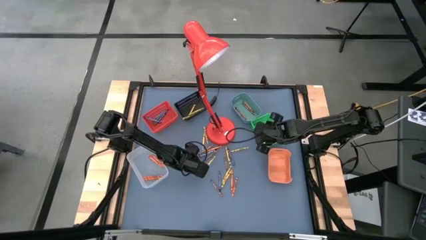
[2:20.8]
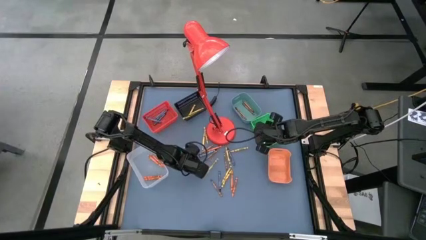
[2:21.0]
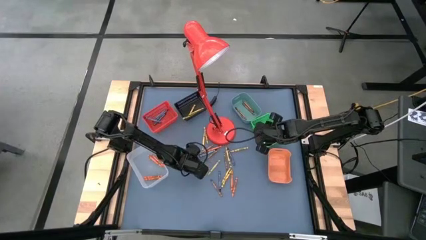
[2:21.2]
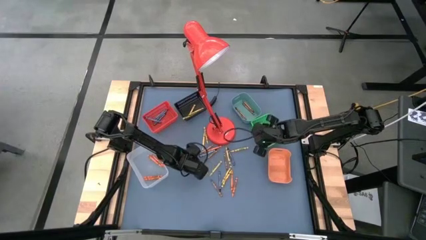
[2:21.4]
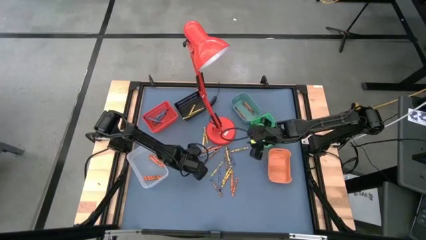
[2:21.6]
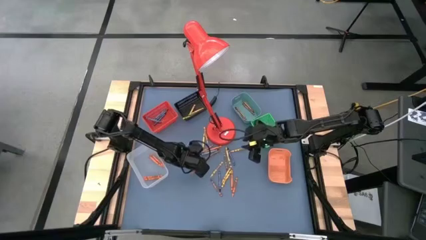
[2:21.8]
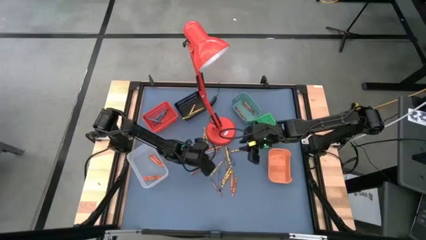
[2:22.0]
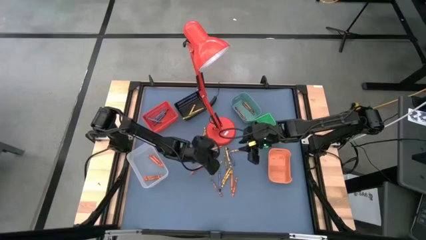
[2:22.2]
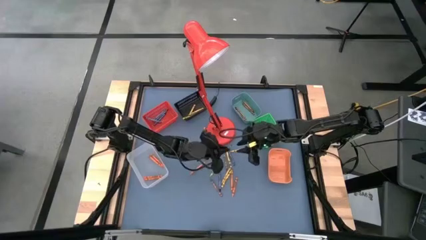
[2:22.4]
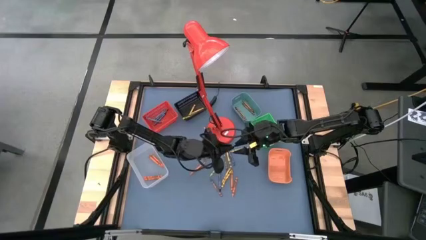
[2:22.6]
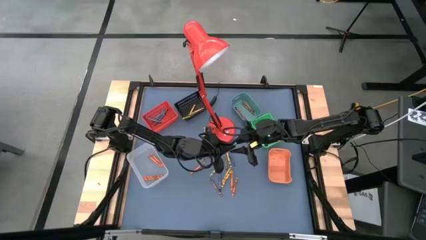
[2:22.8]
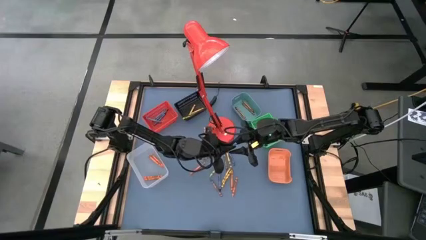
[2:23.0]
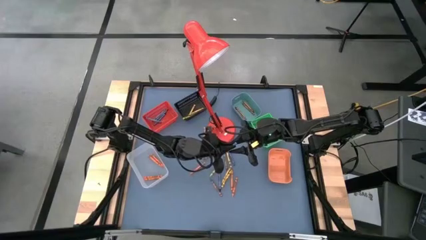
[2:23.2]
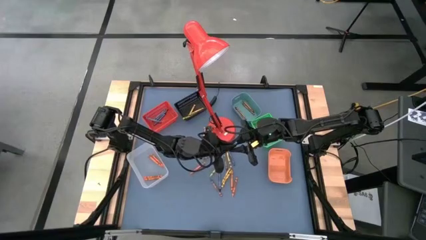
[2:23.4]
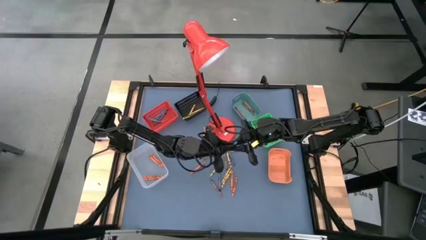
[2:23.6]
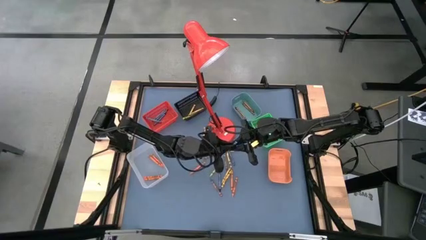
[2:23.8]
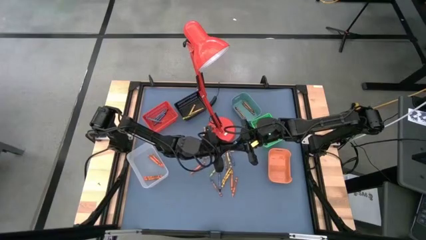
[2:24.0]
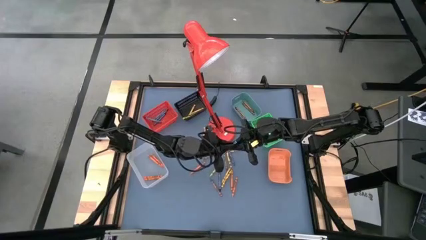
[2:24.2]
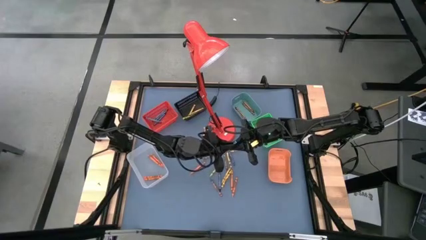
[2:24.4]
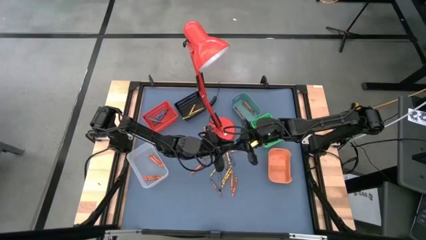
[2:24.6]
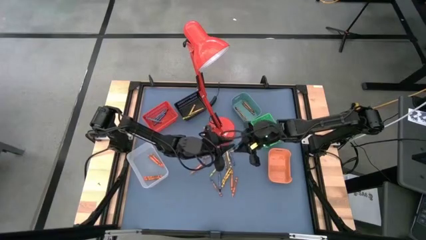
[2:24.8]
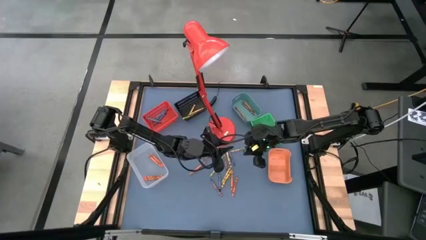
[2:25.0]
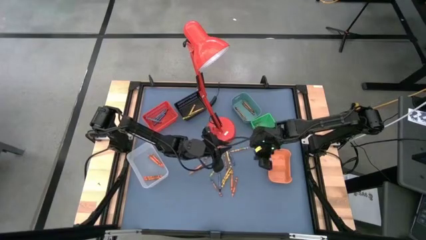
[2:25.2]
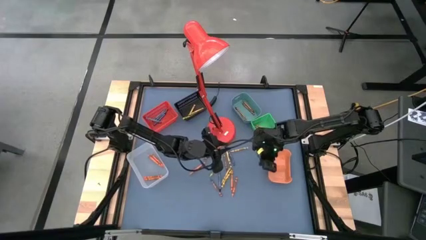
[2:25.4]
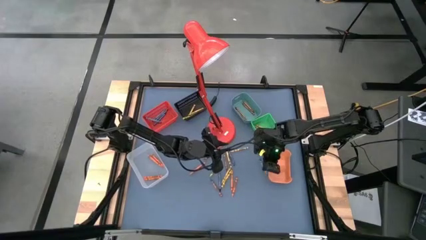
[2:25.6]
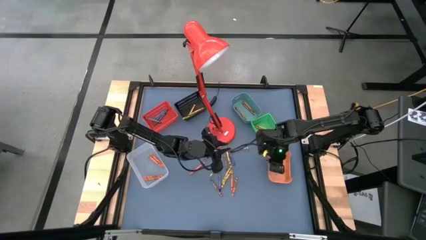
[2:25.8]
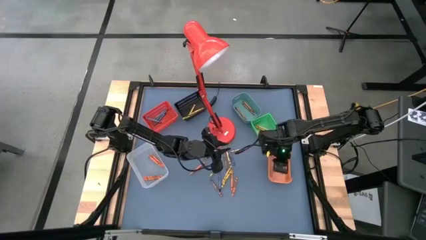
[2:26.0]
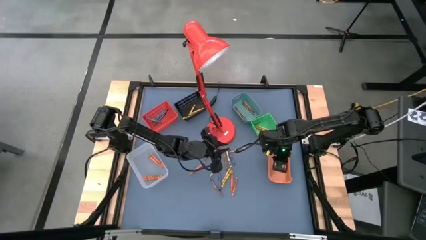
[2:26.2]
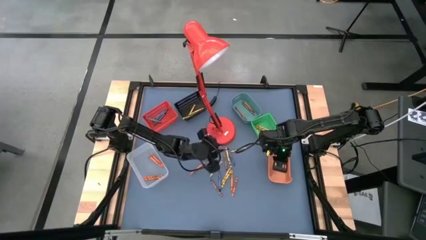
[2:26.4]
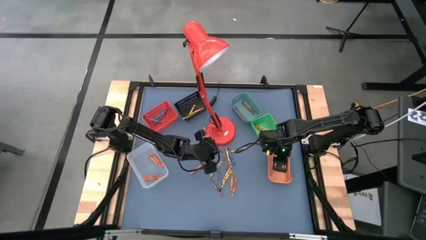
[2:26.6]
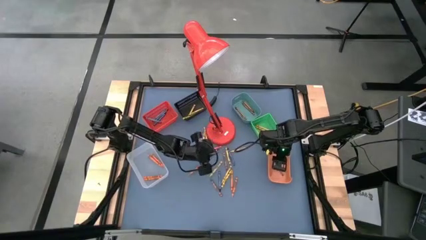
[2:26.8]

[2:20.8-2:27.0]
Task: Sort crayons
Put the blue green crayon into the bottom right orange bin

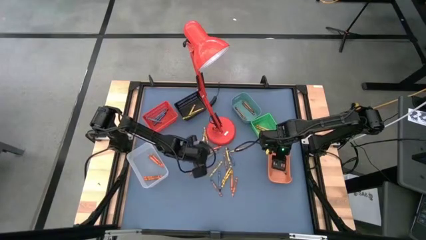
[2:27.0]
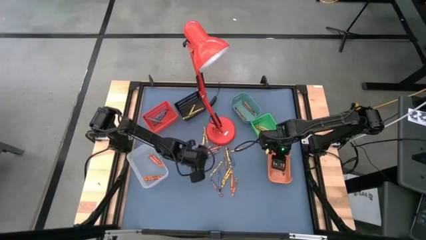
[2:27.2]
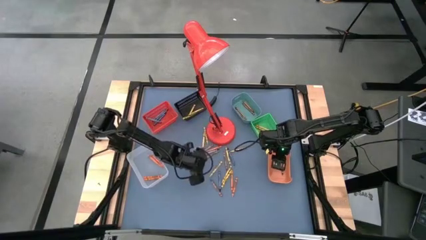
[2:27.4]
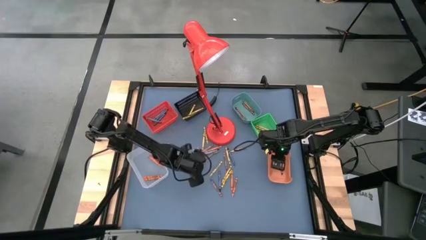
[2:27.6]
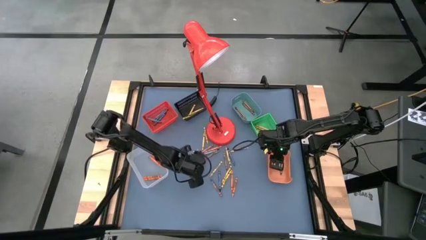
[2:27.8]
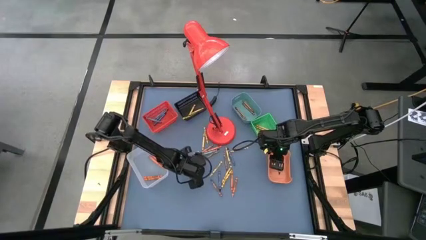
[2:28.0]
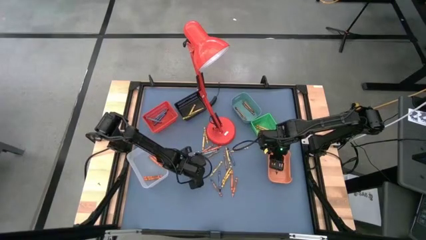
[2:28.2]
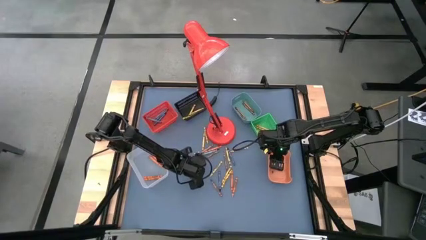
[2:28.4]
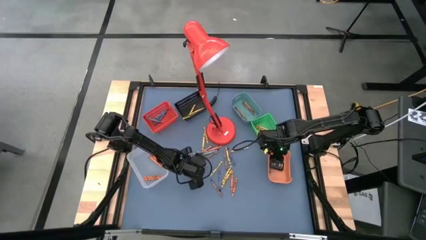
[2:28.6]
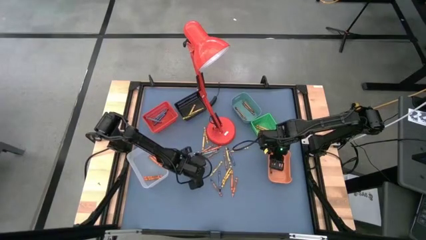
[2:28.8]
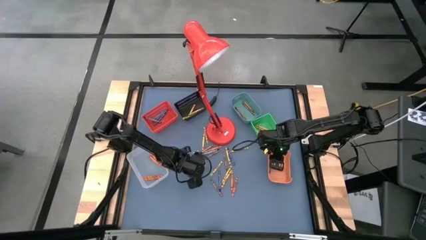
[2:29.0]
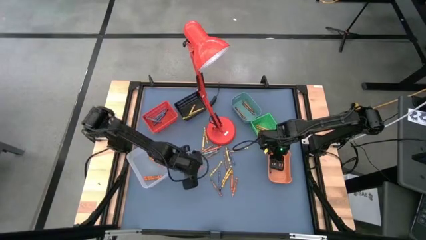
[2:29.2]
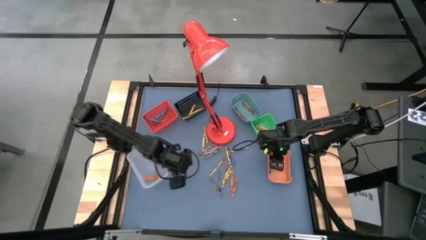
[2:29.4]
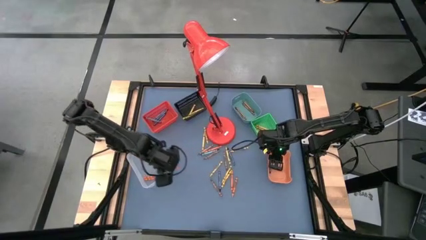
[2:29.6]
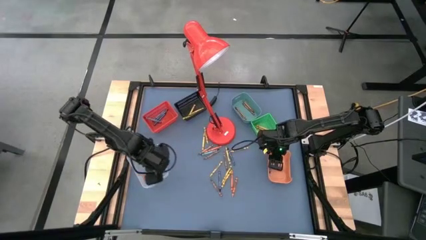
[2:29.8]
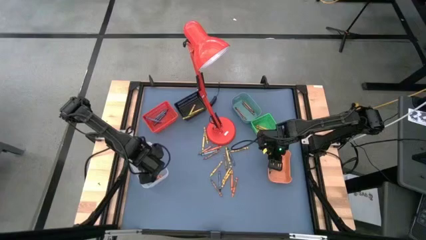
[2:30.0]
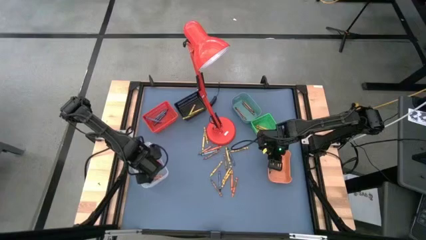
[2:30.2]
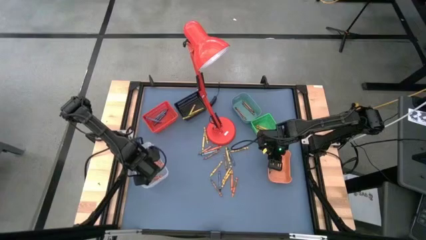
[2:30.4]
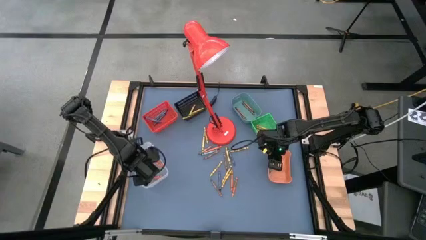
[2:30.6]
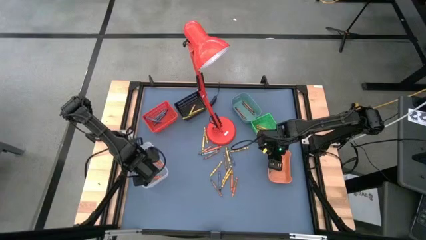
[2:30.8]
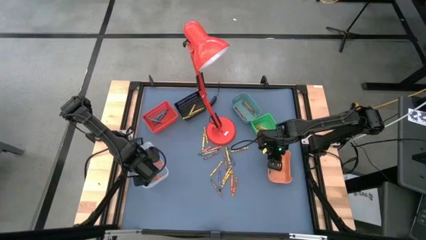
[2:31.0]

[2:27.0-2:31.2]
Put the orange crayon into the bottom left transparent bin

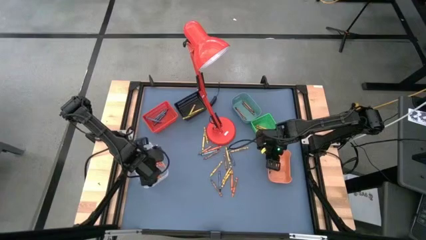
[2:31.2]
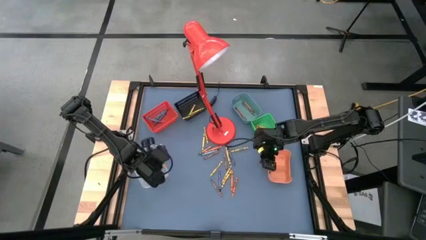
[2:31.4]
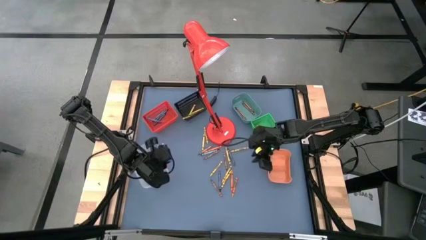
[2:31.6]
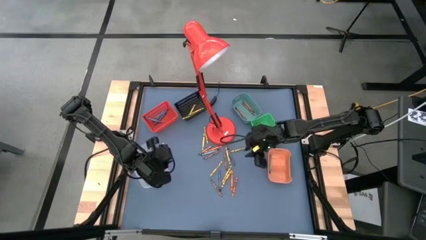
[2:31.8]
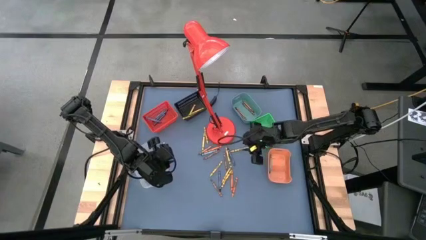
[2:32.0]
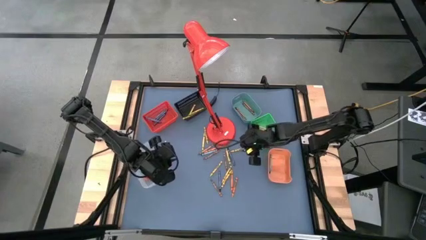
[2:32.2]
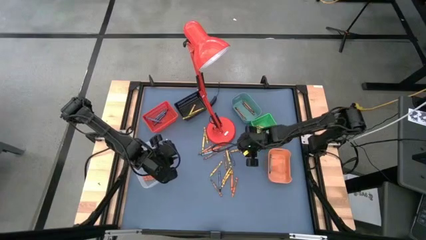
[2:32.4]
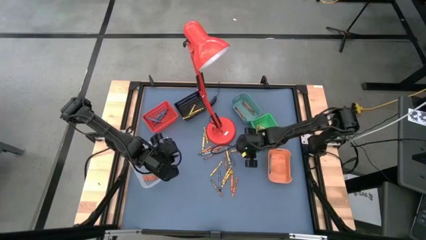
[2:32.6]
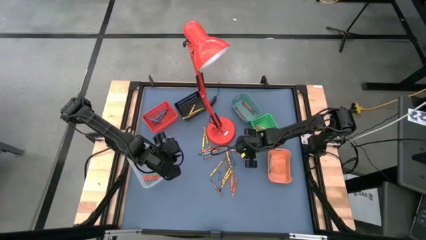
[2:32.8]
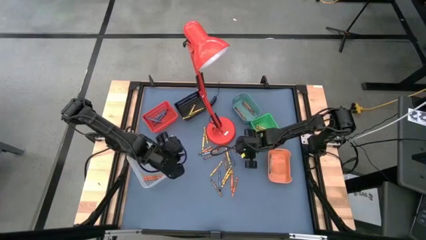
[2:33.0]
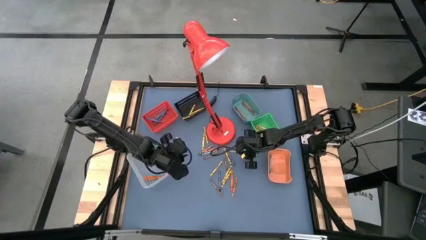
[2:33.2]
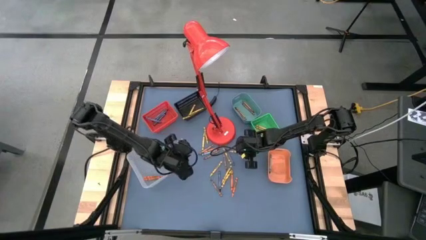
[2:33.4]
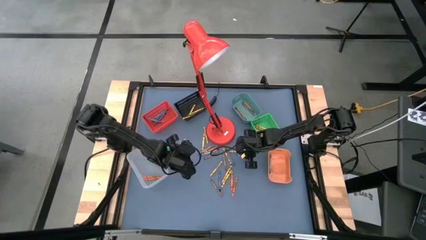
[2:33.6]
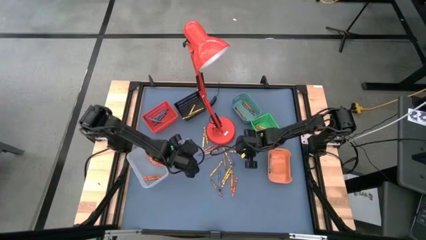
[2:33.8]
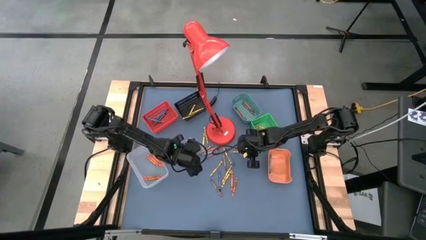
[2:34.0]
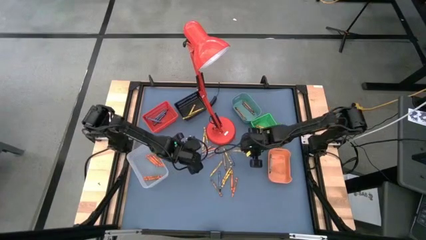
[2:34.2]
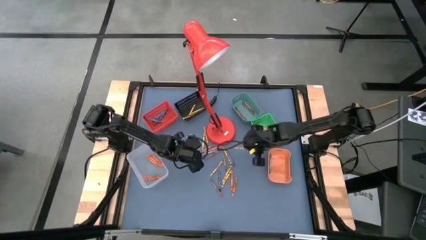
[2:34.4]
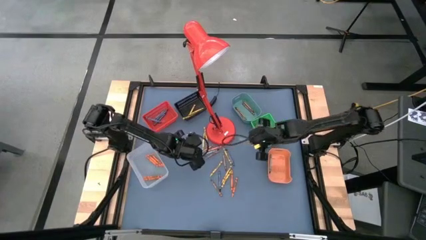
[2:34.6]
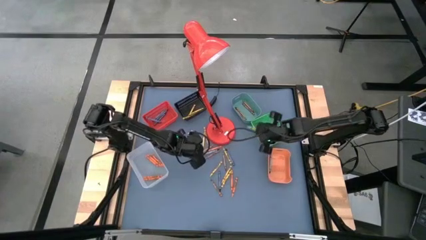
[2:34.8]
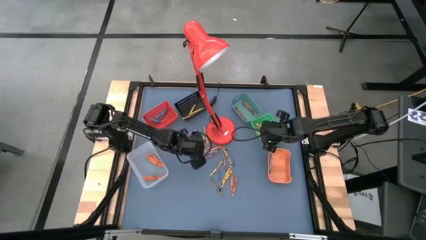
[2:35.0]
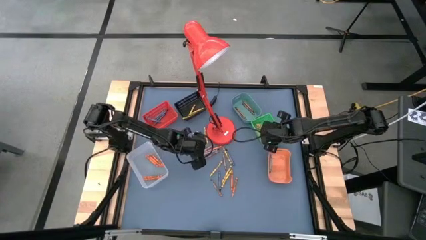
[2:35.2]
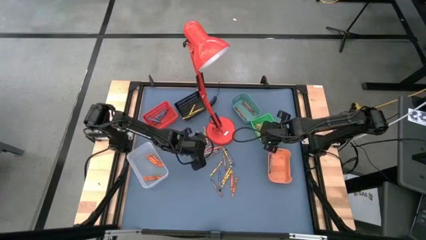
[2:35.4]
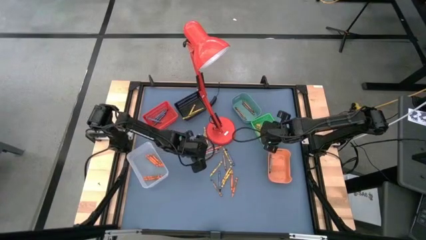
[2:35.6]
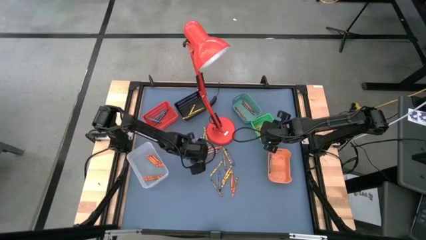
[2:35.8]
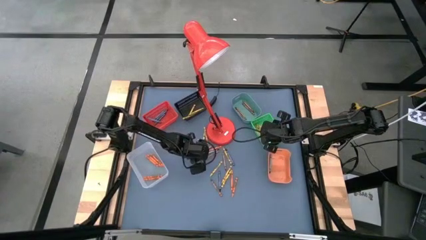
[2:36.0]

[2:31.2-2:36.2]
Put the yellow crayon into the middle right green bin

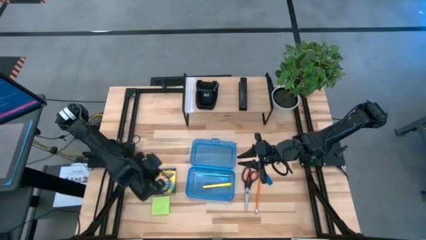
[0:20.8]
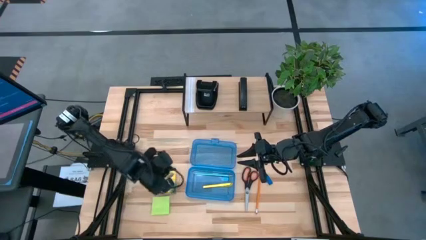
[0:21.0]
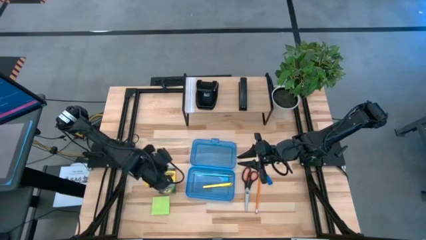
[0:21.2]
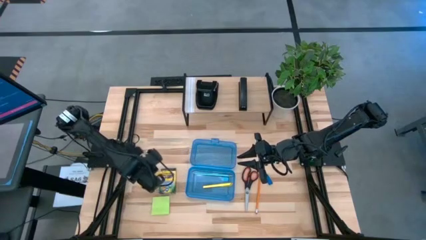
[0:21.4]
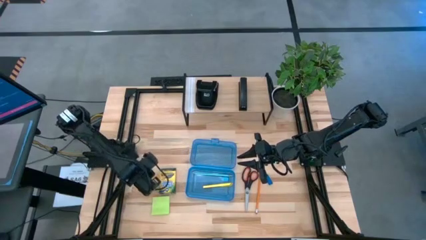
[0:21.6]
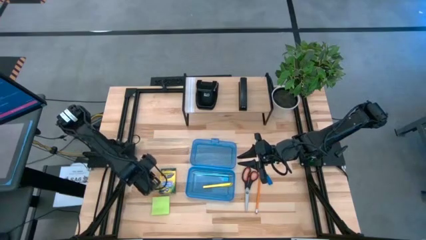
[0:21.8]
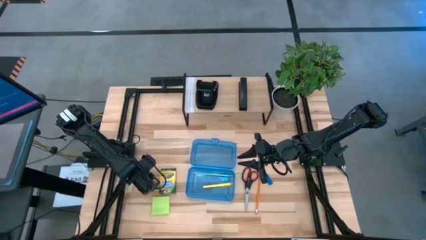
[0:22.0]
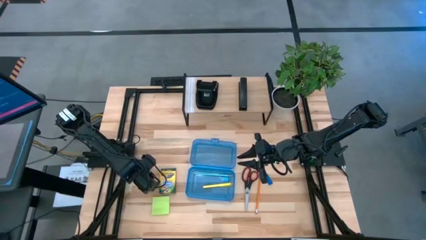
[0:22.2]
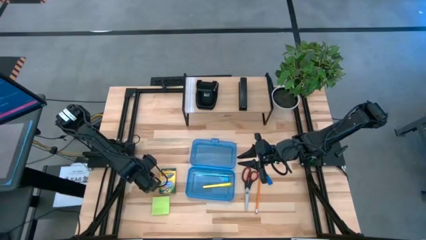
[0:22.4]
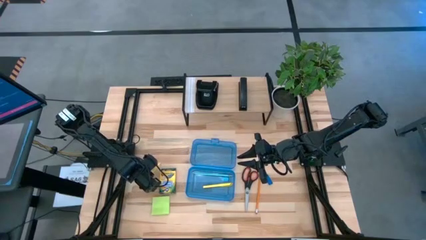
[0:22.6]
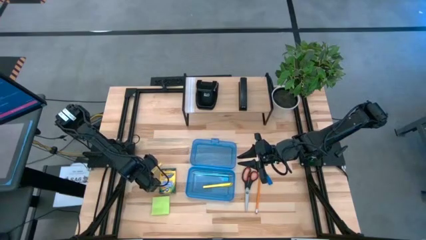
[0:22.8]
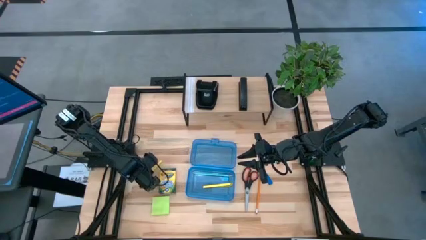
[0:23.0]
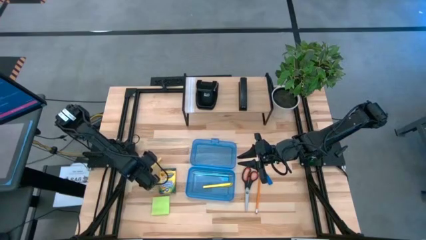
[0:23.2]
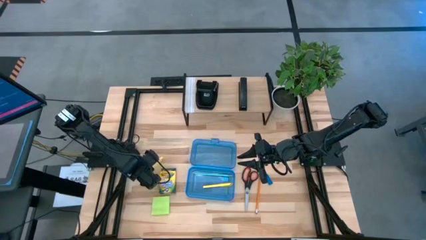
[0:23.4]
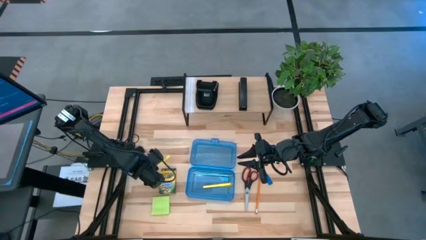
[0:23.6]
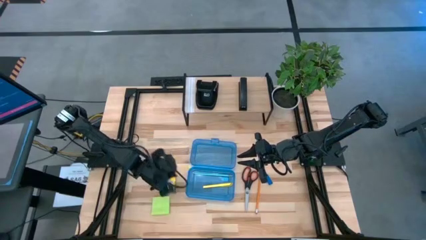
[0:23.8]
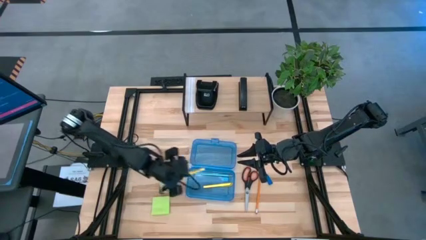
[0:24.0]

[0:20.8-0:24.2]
Task: Pack school essentials
Put the yellow pen into the blue supply box
